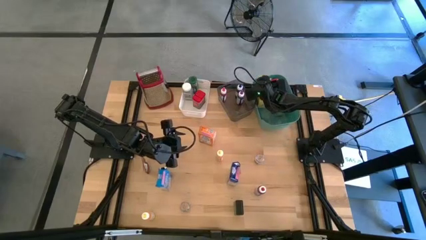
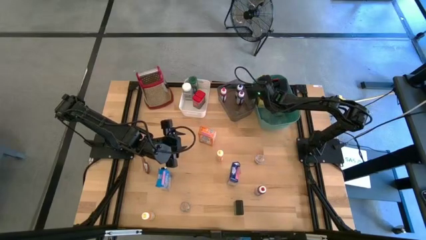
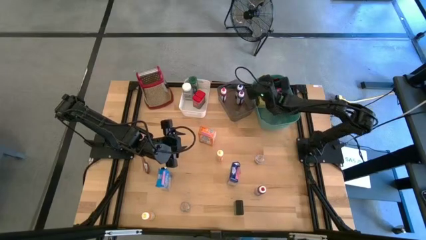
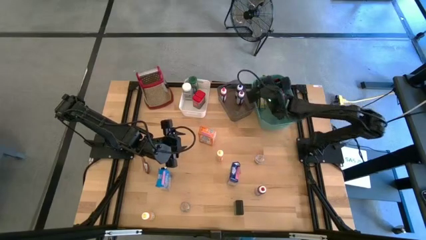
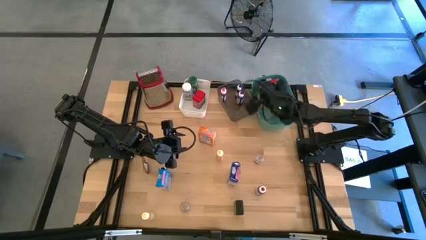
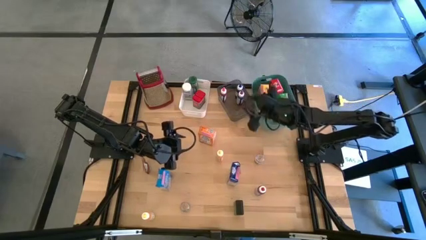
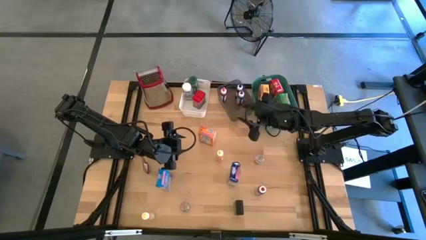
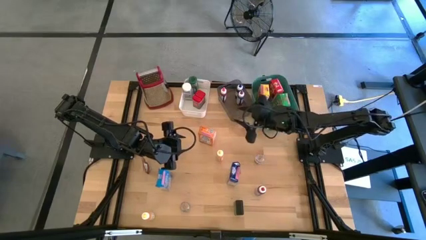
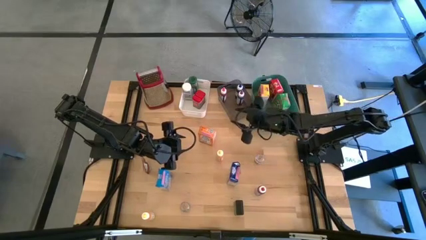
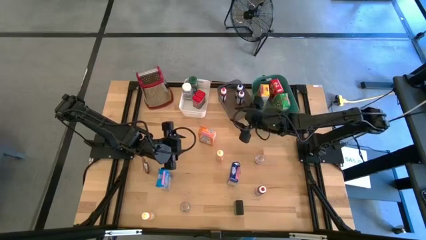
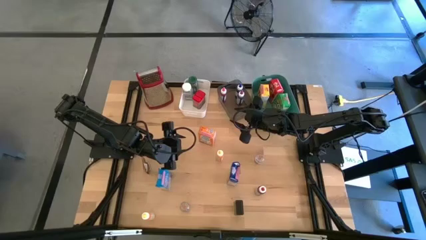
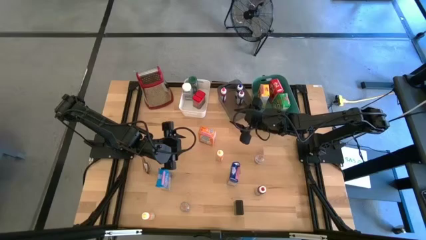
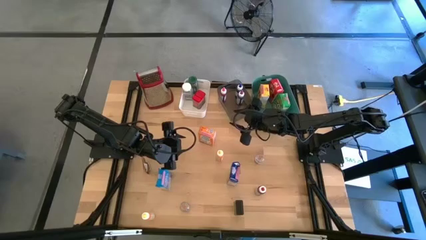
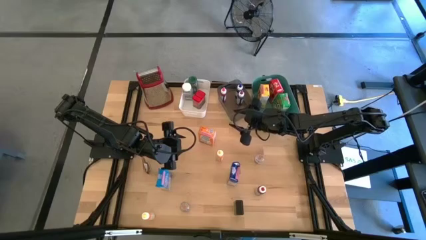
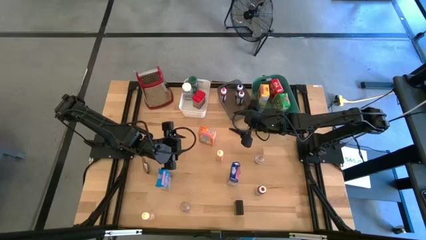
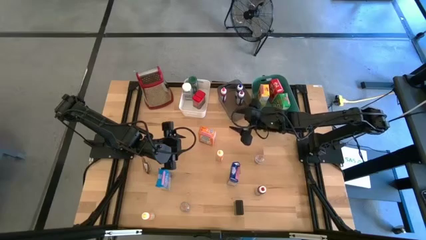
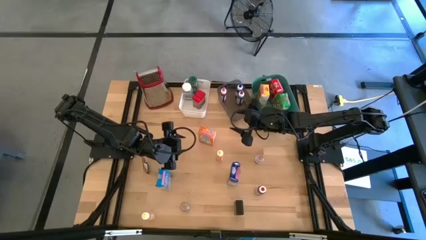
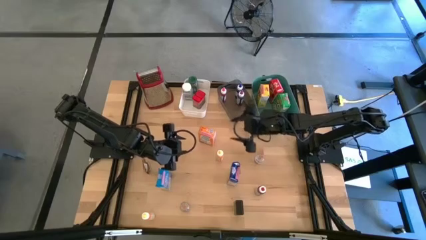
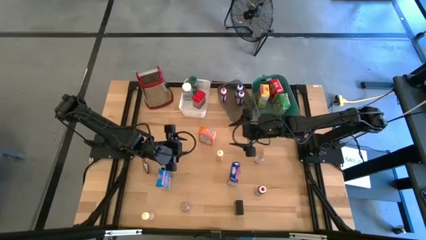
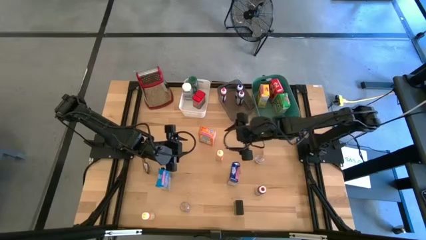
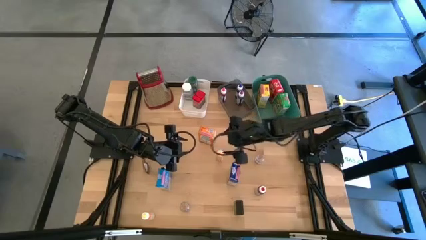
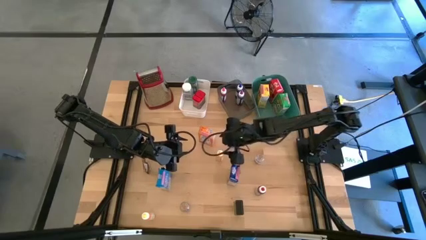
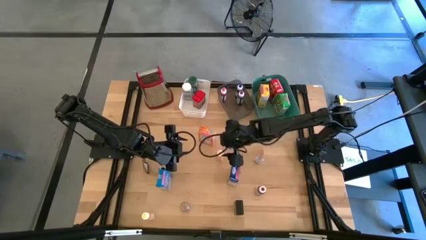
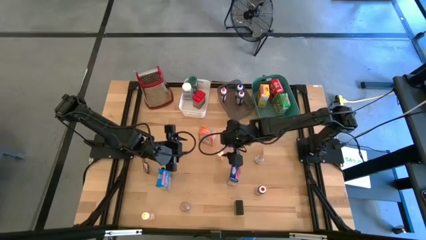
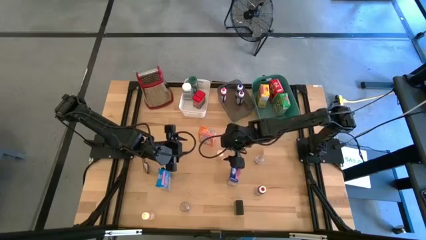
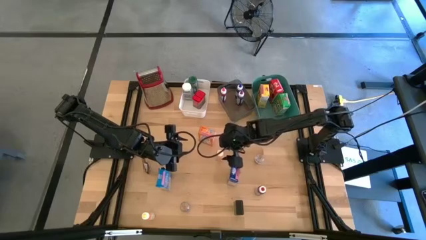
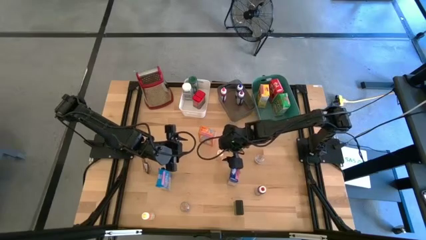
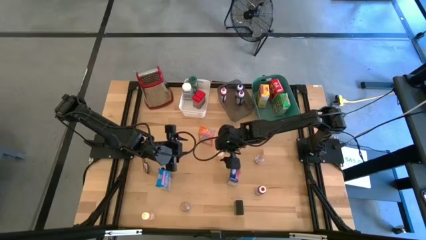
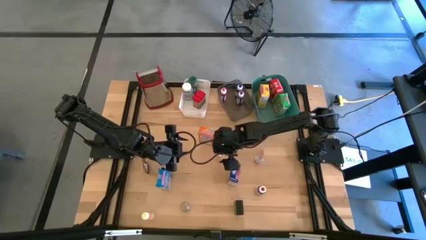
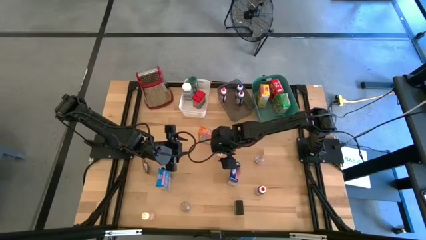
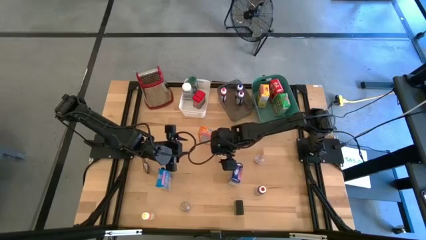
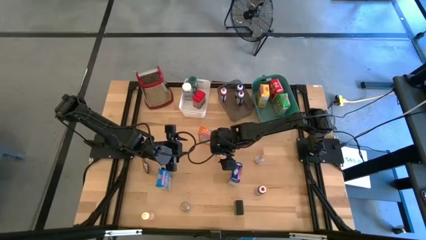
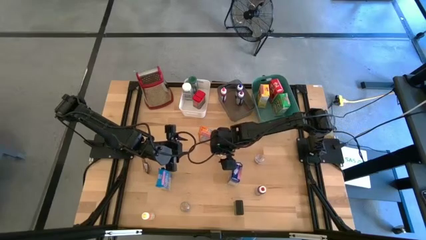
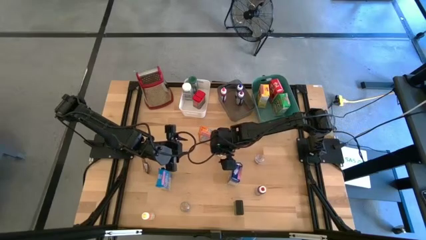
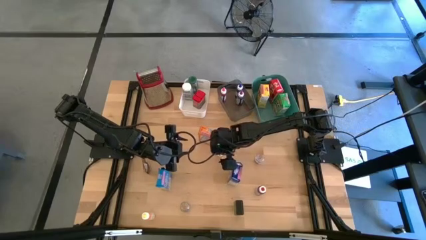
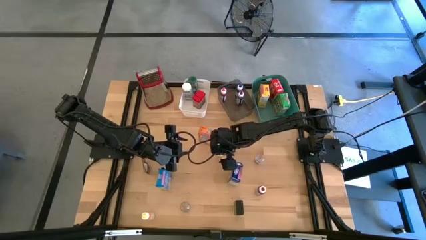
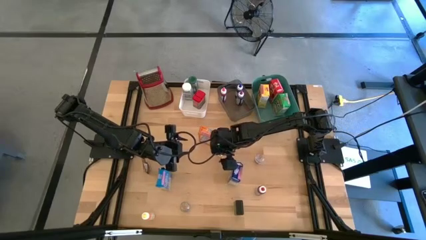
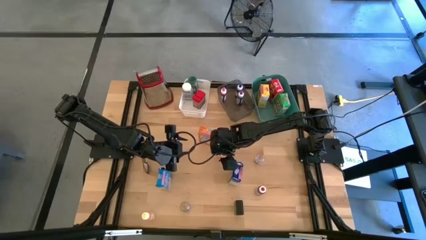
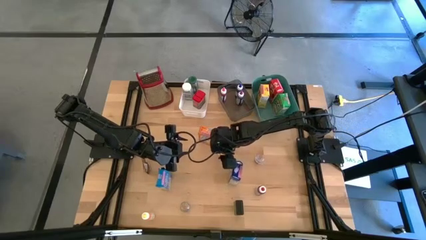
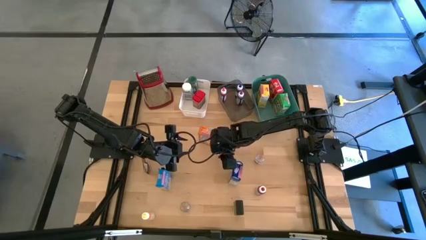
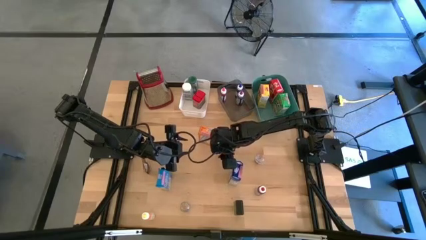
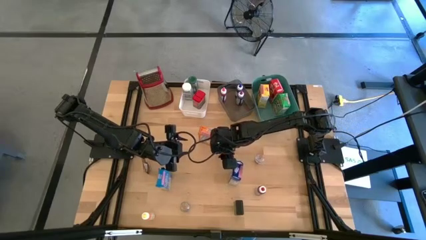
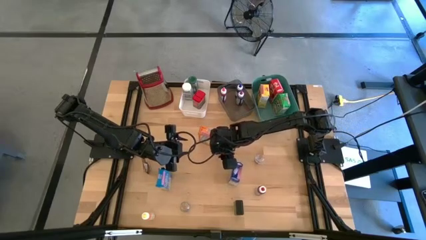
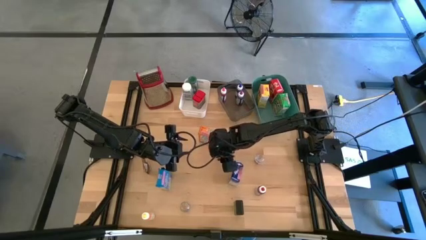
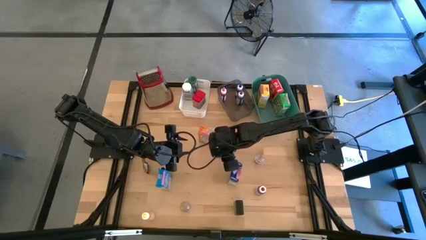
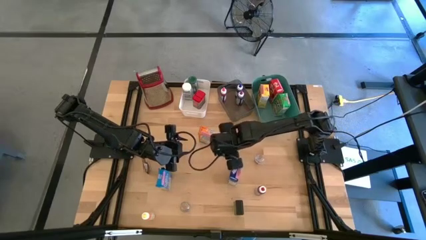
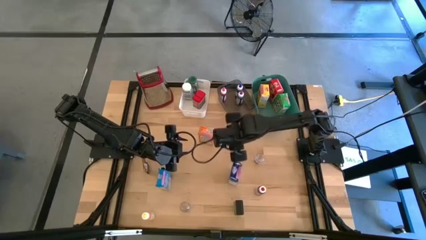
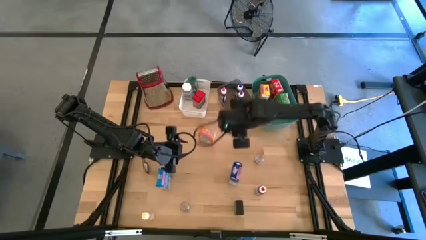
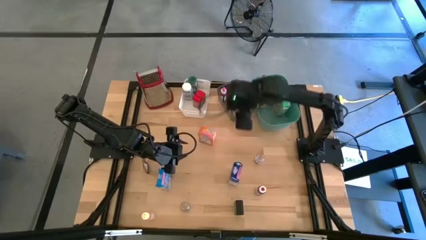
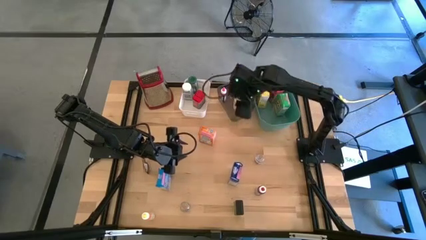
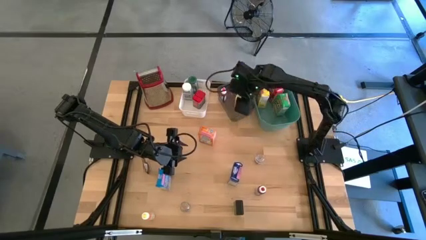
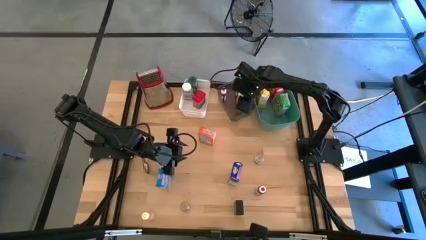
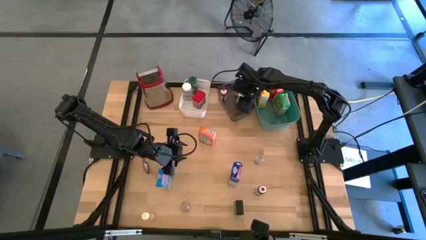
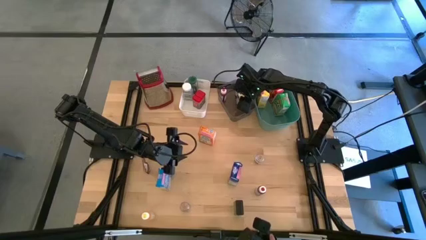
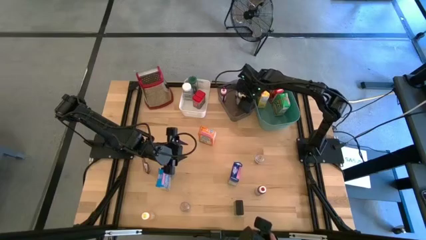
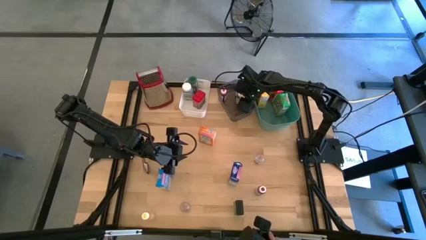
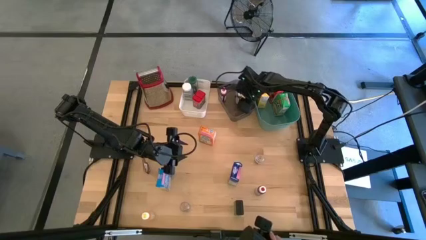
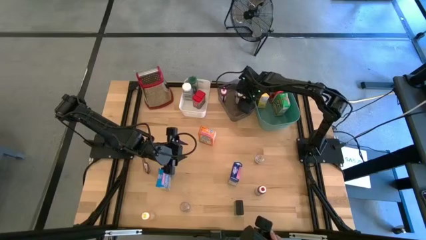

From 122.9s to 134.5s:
Task: Pick & Place Kitchen Items
Put the top yellow food coloring bottle into the black bin

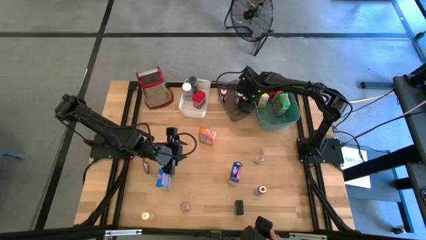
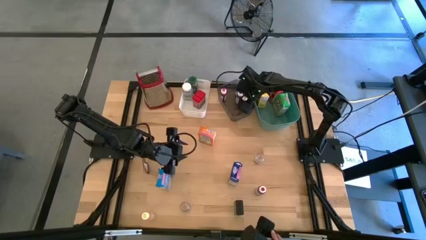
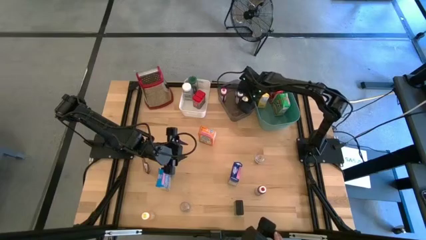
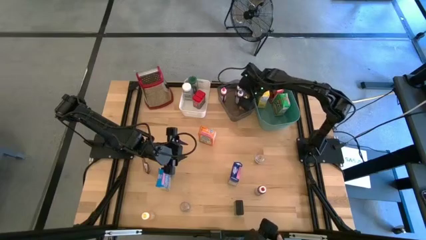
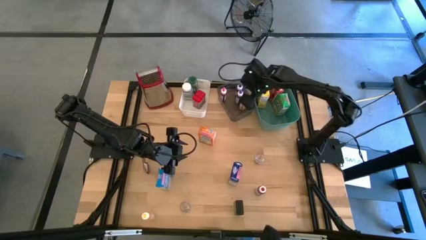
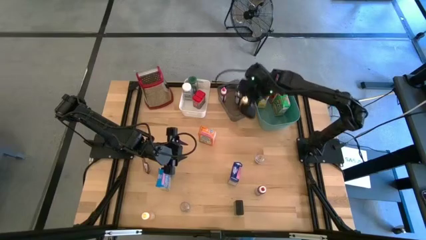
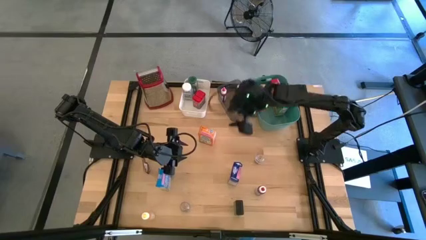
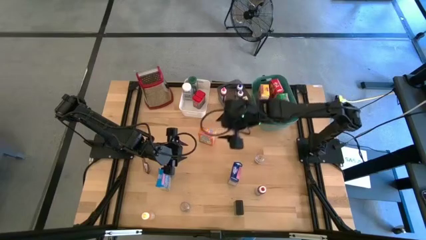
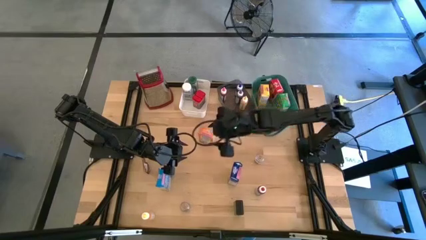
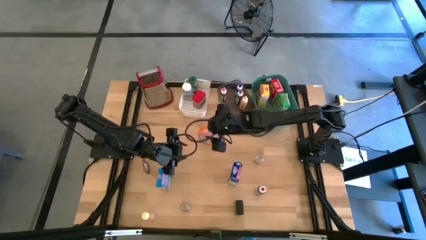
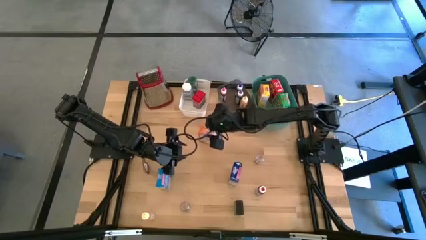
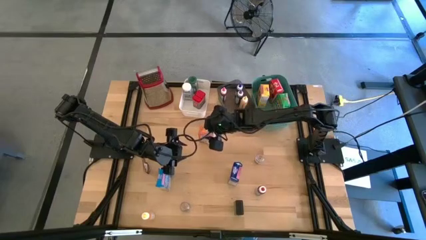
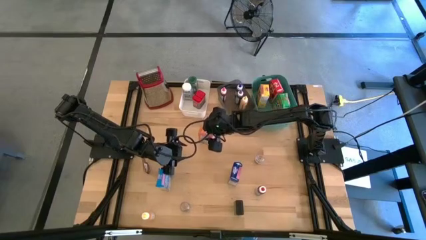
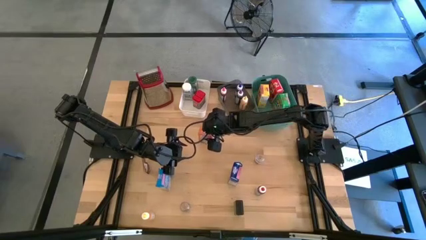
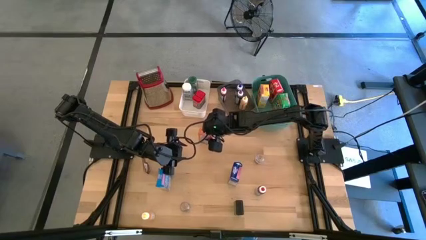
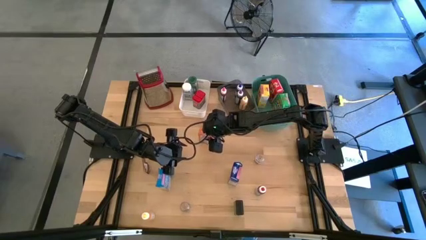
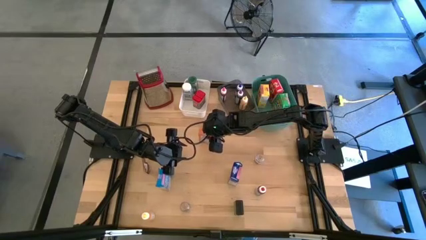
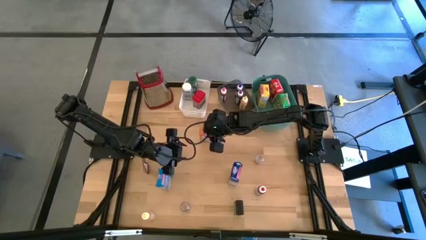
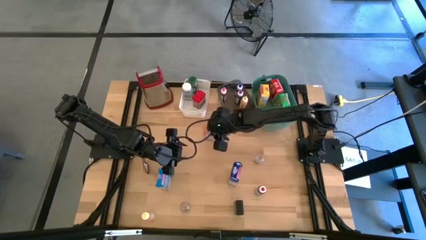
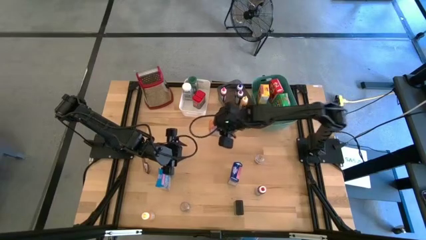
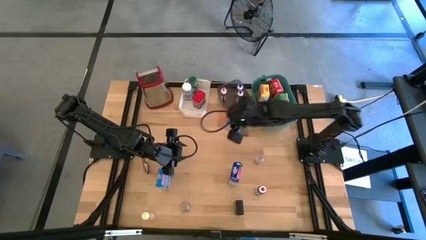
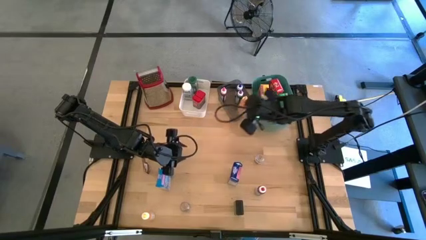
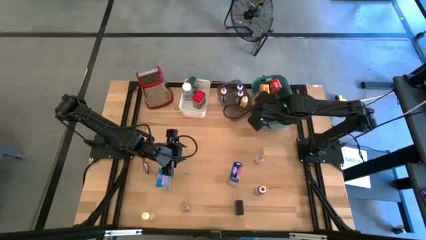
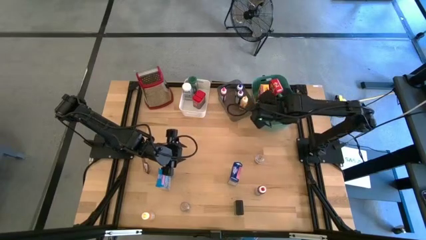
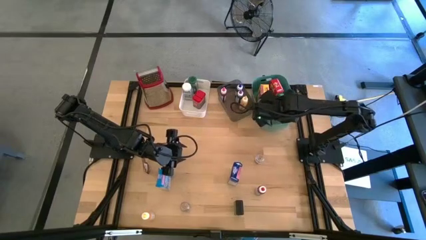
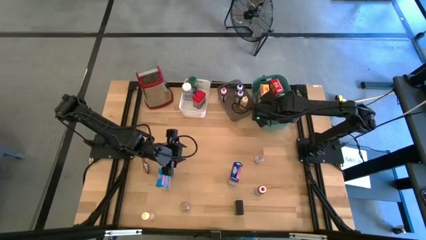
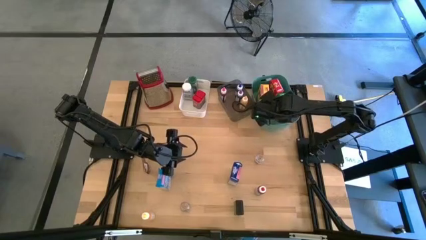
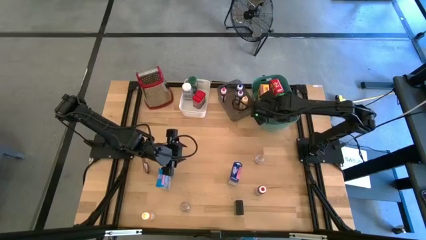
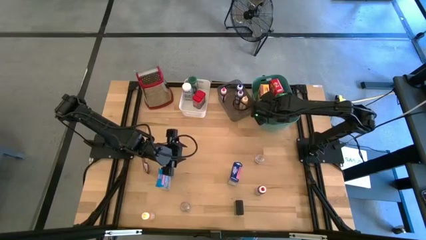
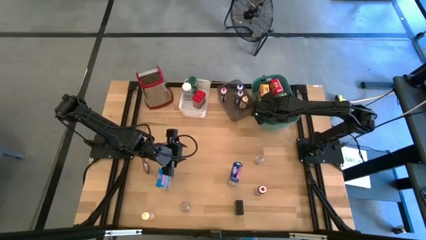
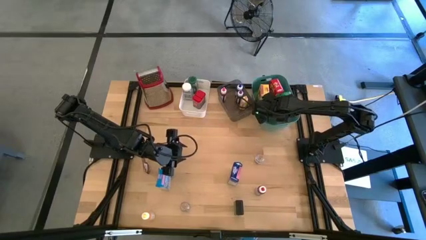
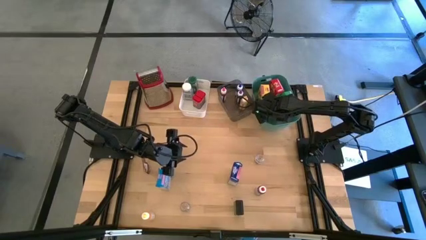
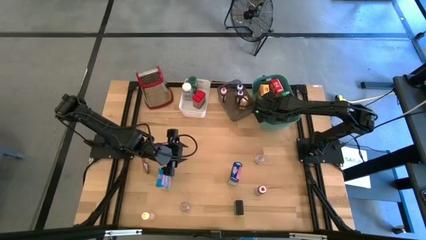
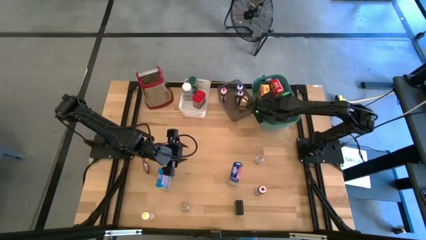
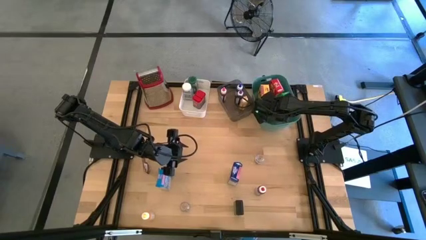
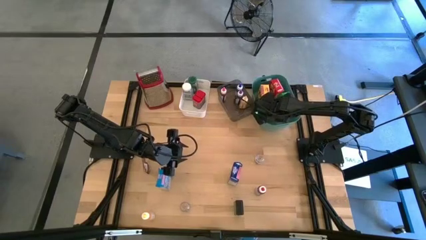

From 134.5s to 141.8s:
Put the orange cereal box into the green bin
